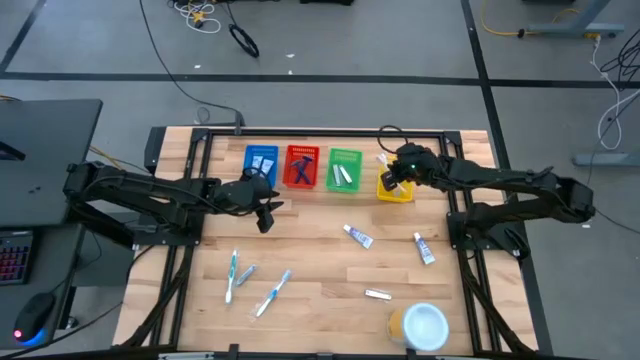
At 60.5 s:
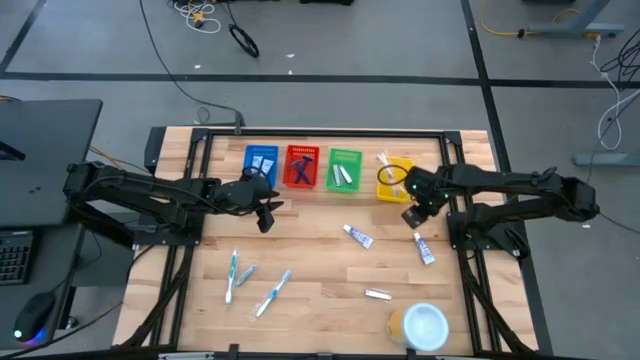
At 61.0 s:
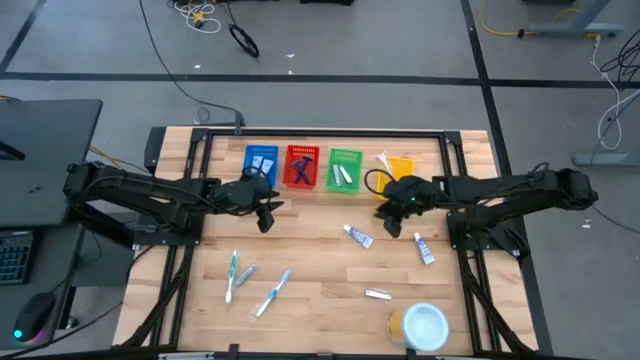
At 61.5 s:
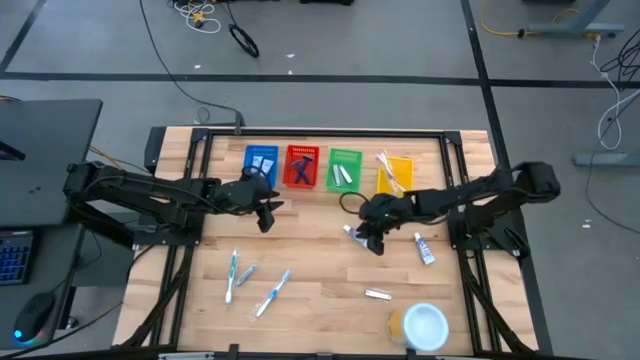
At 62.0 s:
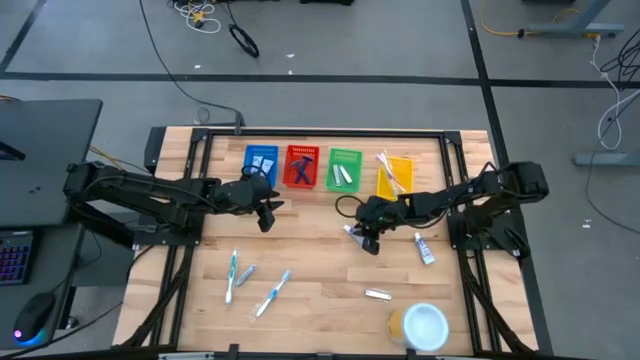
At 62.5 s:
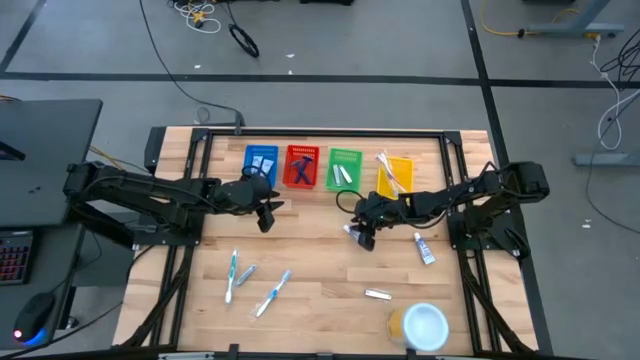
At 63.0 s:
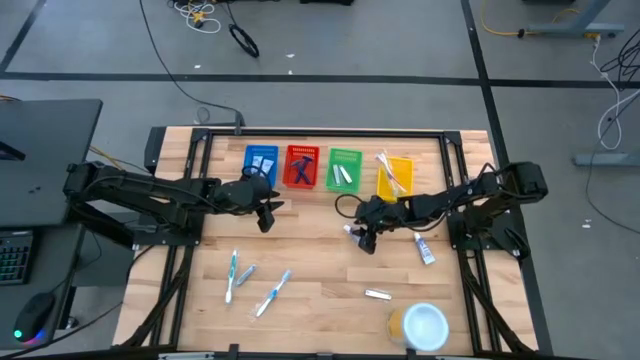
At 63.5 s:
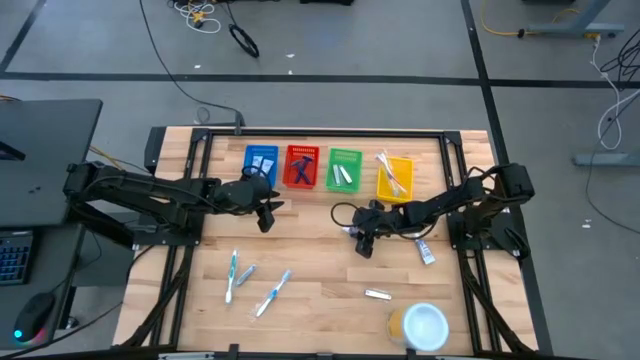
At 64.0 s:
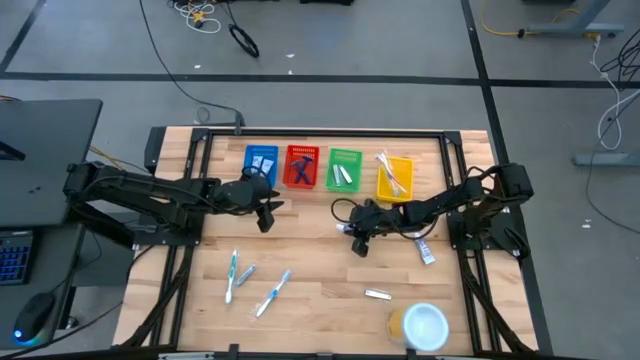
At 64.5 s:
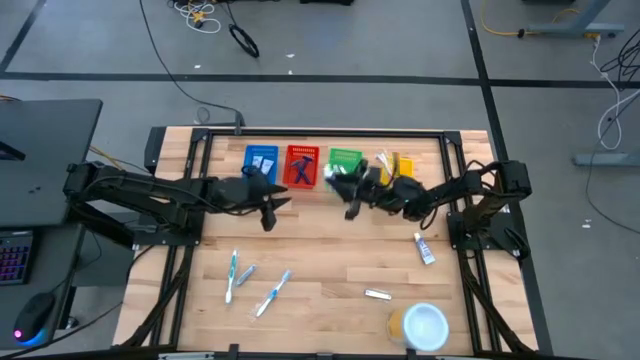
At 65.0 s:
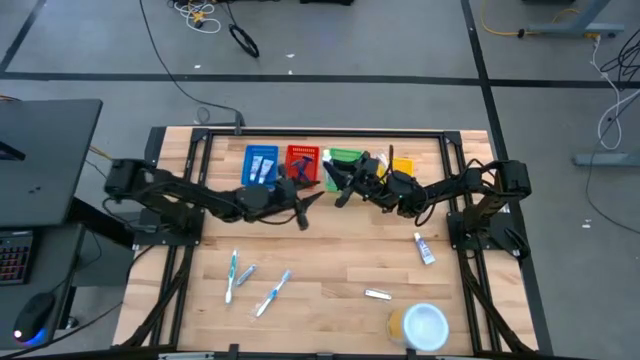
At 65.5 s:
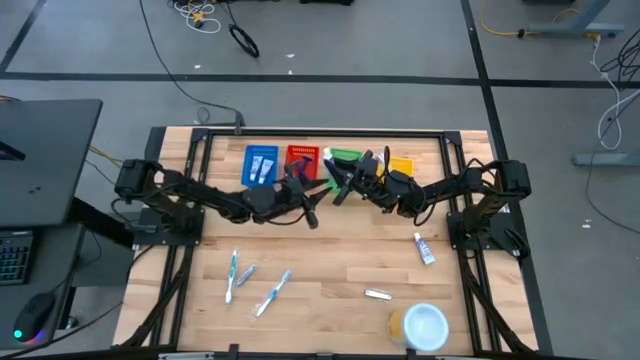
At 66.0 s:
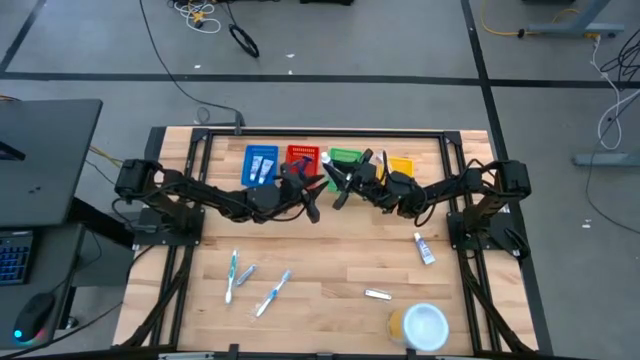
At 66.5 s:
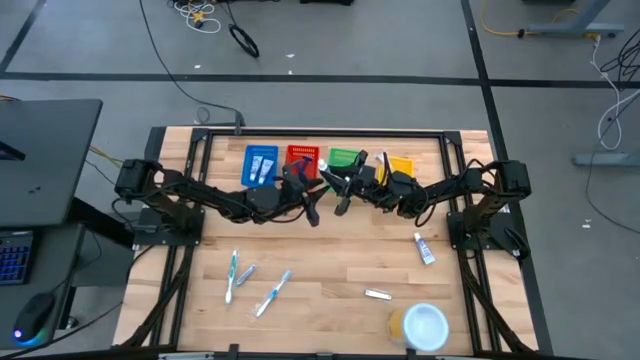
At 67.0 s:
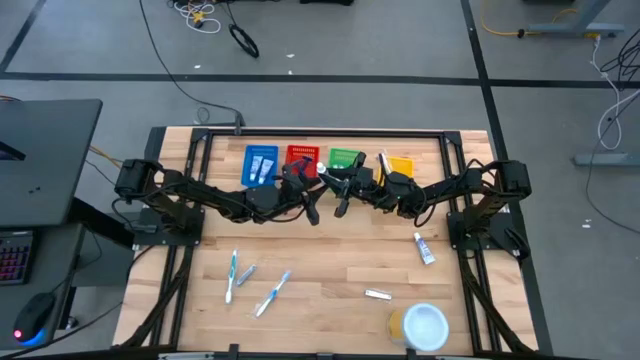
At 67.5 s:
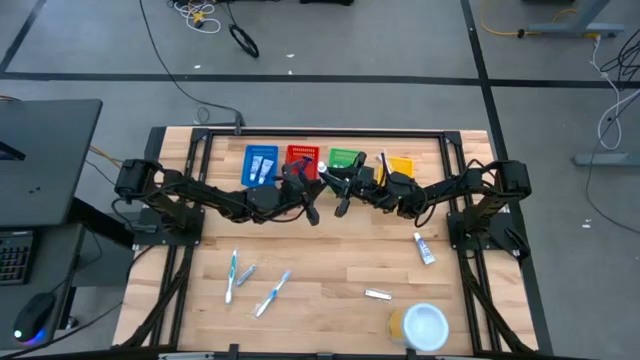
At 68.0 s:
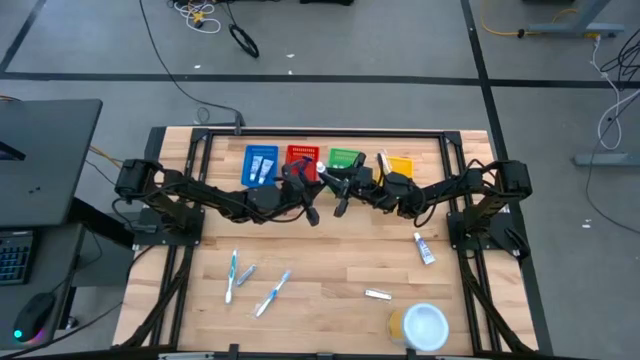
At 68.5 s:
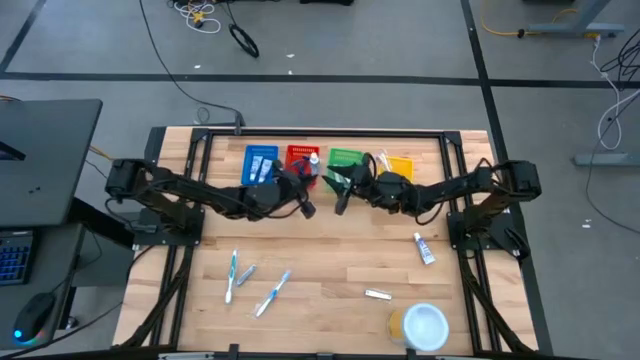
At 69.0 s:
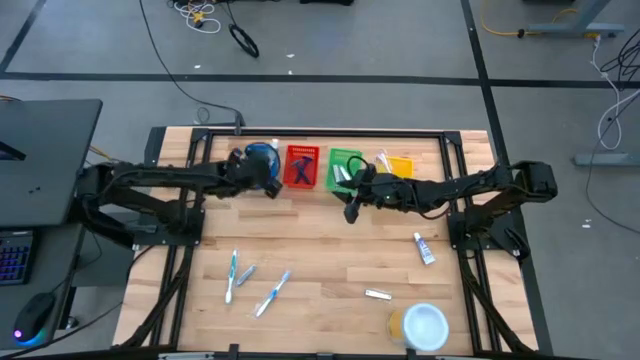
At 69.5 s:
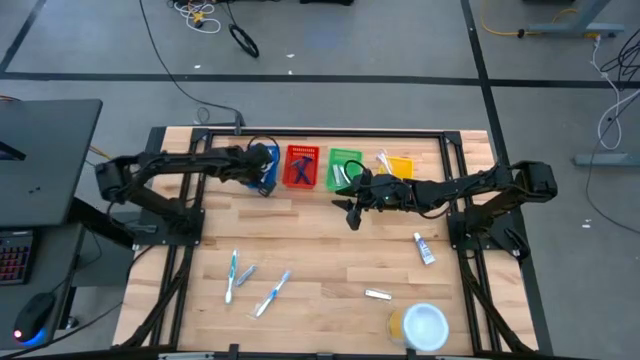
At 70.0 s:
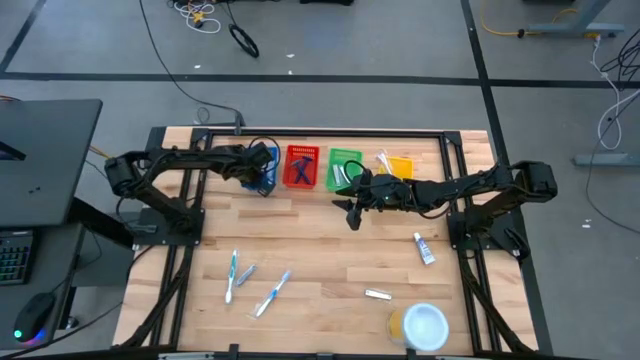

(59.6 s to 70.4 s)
Task: Pick & Place Travel size toiletries
Put the white toothpaste into the blue bin

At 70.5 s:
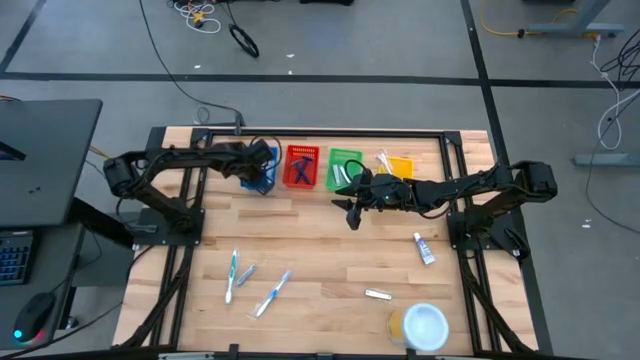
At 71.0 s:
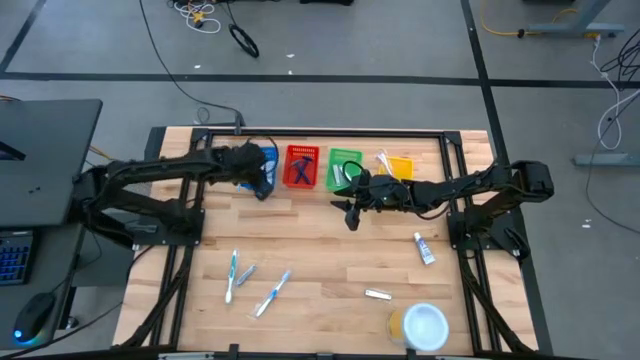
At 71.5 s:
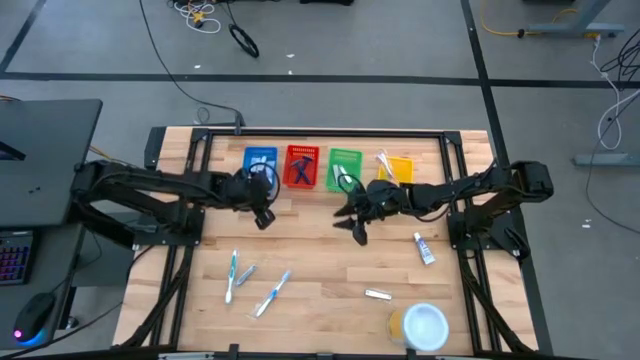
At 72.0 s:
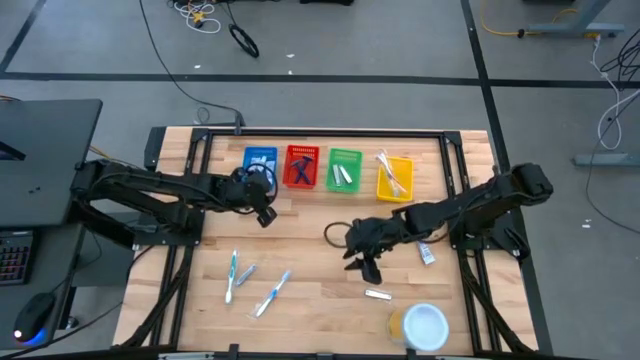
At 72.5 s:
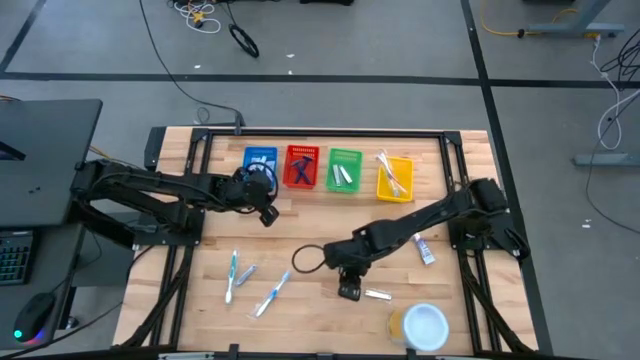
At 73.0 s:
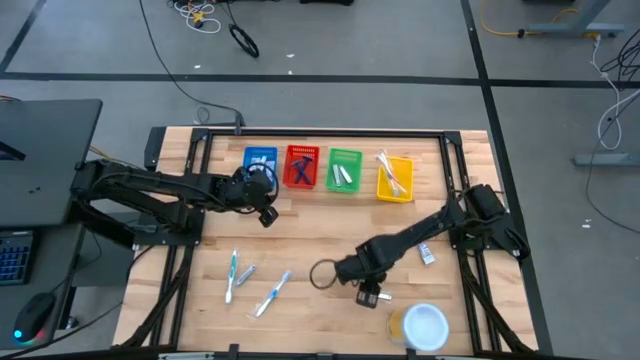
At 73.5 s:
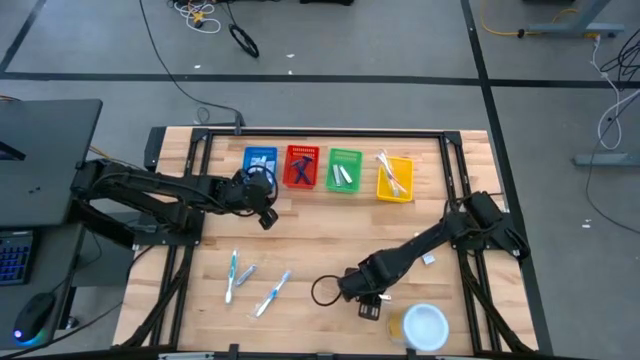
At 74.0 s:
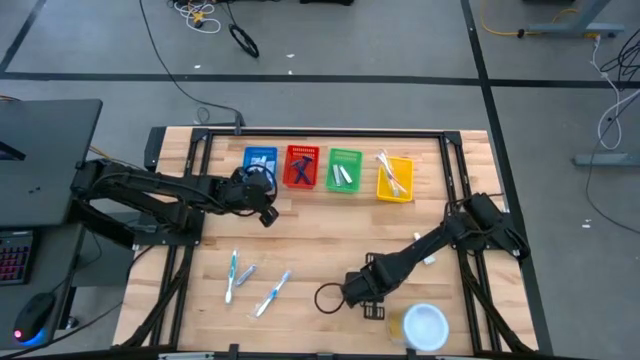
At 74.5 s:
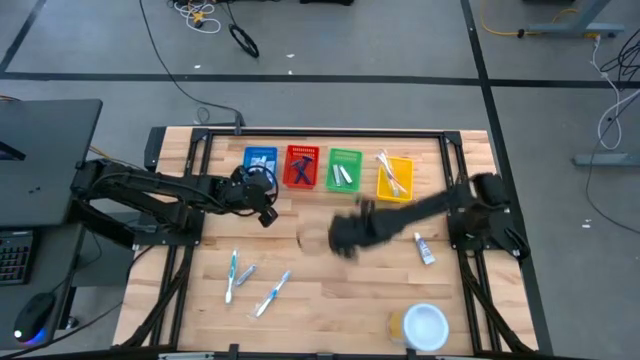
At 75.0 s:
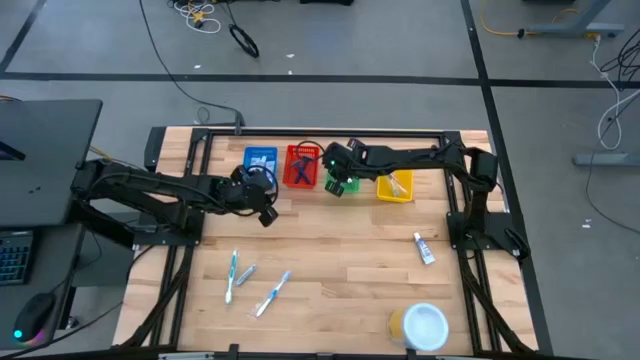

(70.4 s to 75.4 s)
Put the silver nail cutter into the green bin

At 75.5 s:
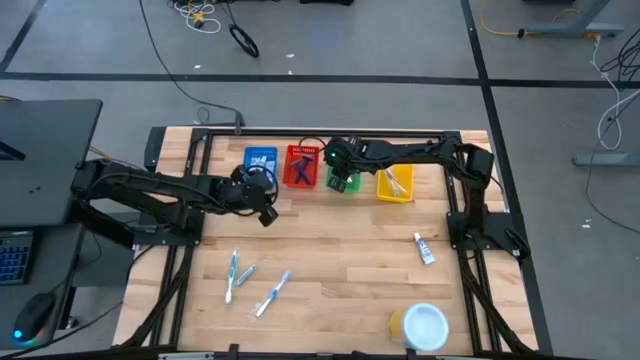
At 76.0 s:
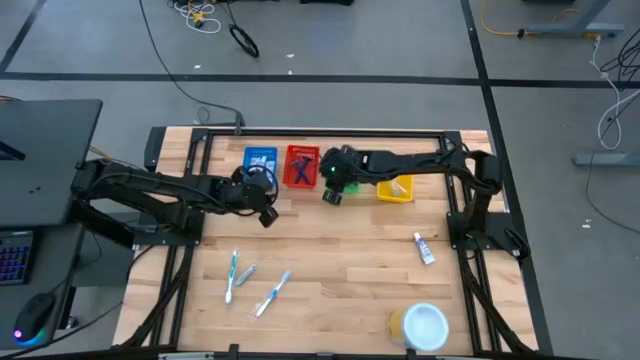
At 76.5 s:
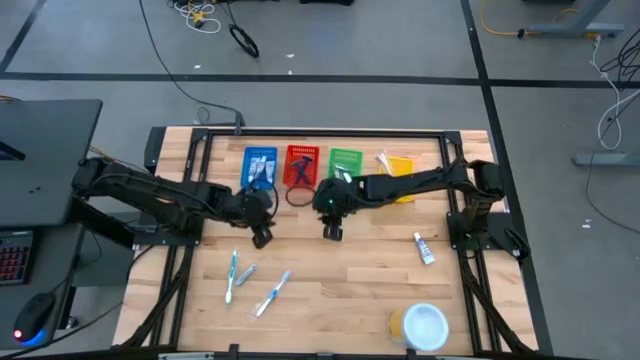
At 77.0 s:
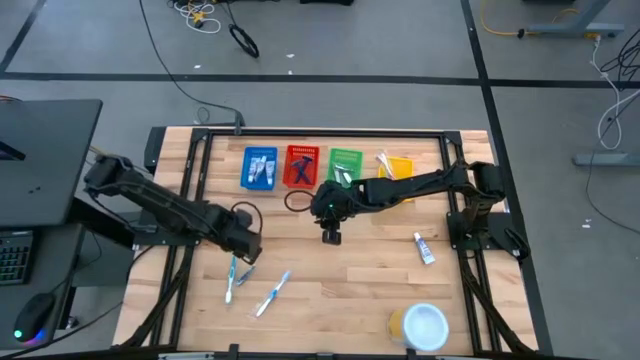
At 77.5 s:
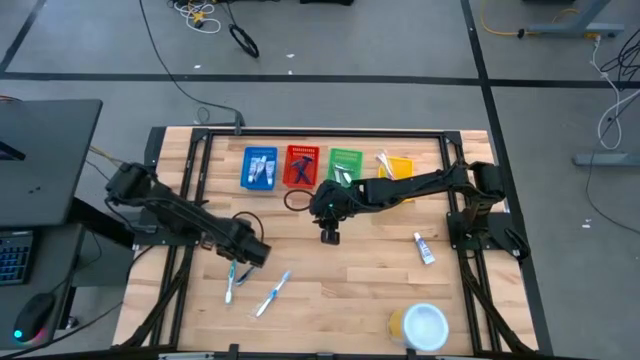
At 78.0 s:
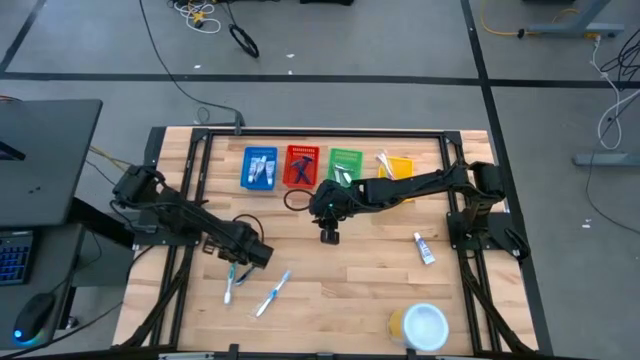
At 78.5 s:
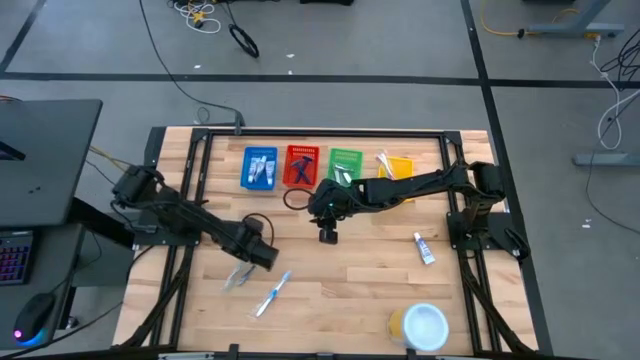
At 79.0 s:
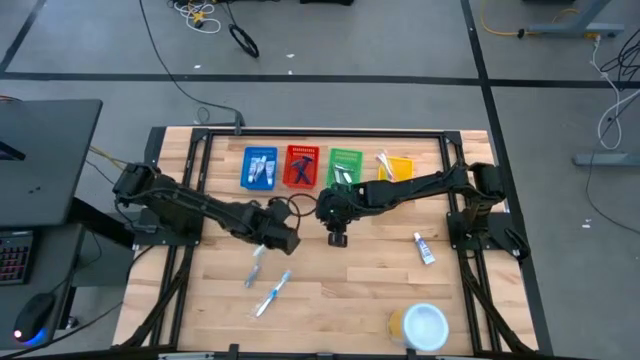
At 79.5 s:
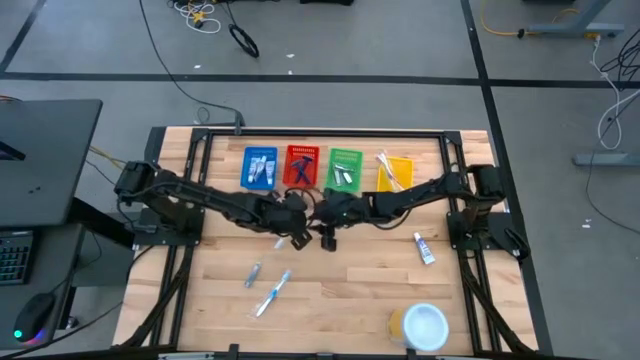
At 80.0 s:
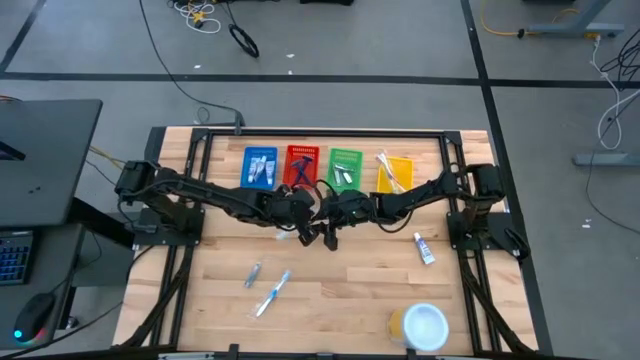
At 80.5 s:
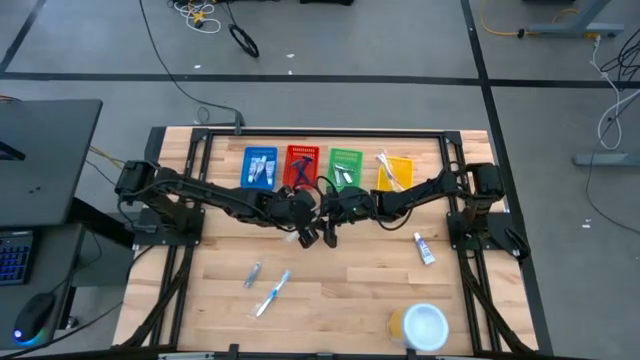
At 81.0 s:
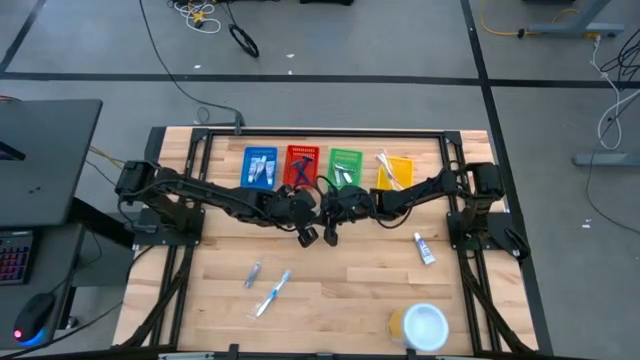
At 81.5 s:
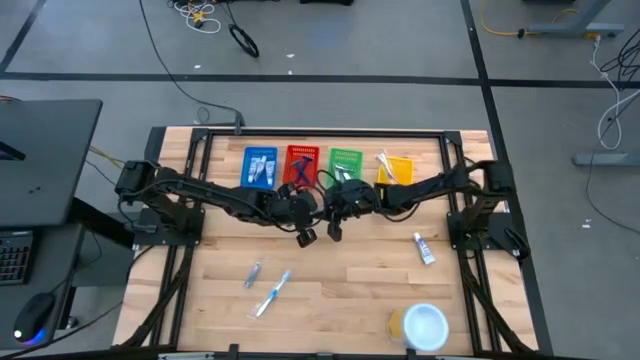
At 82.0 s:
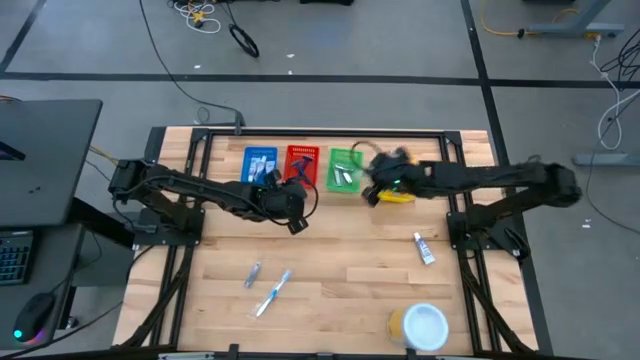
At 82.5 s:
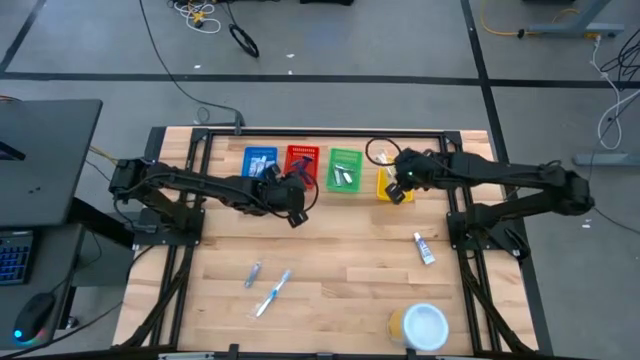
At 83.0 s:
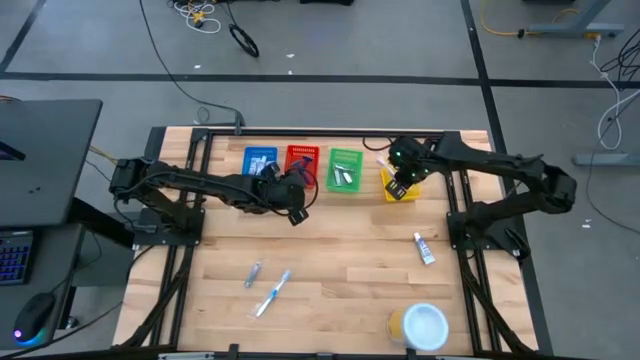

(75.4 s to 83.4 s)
Put the blue toothbrush into the yellow bin
